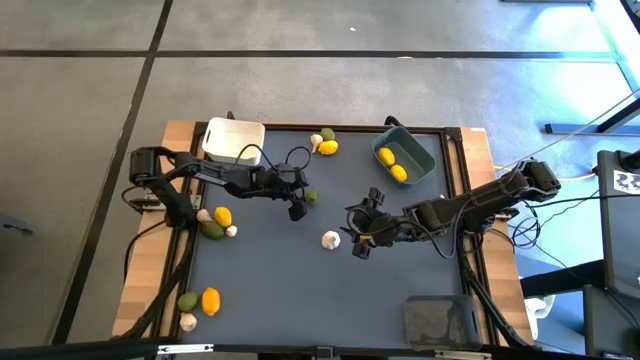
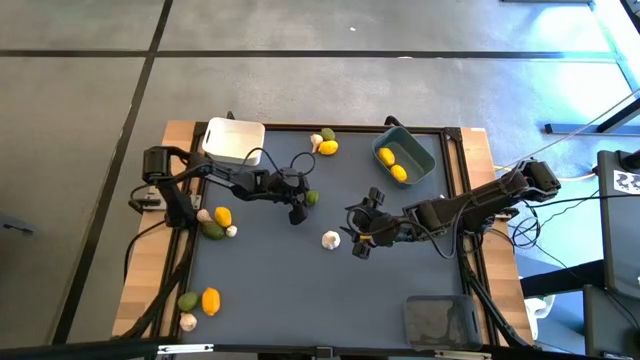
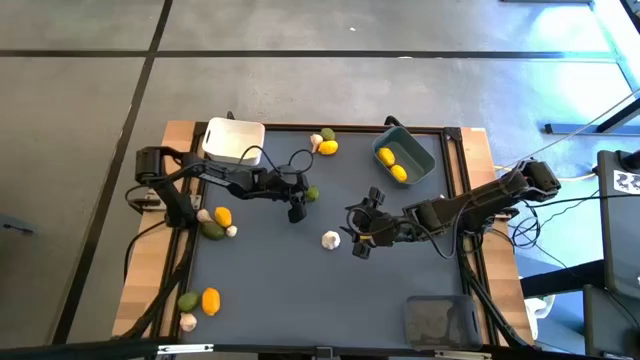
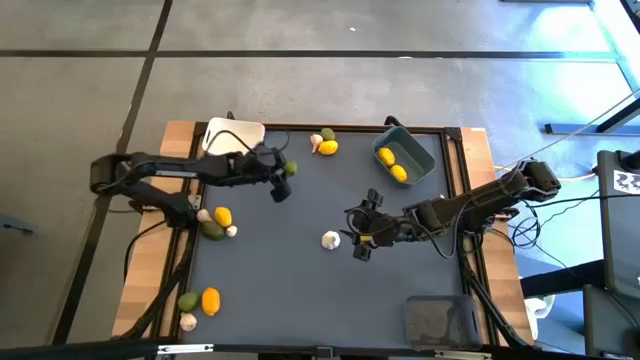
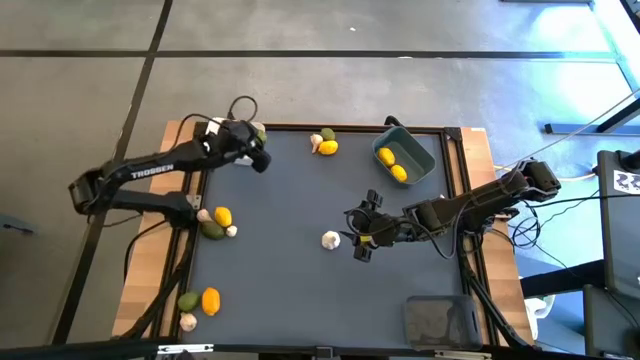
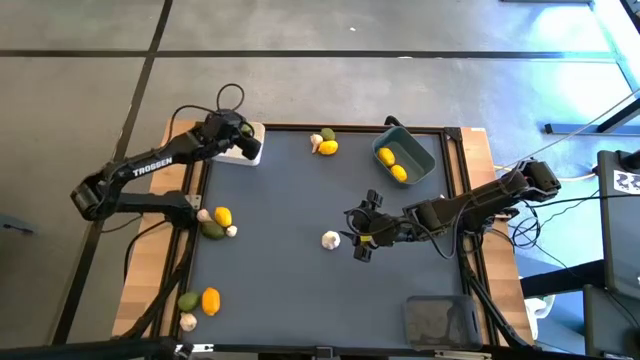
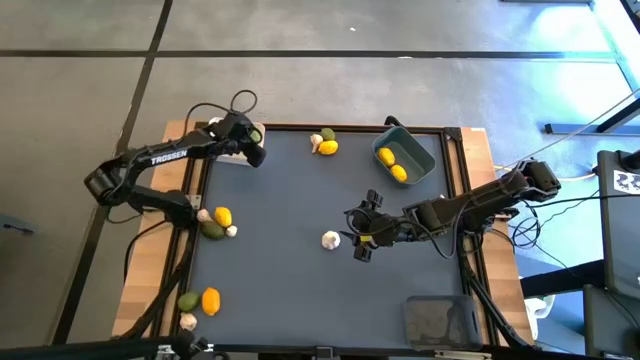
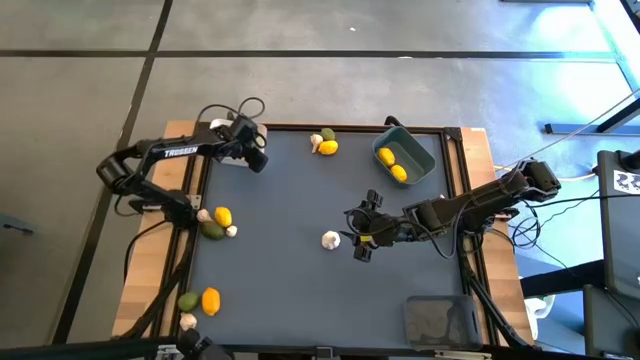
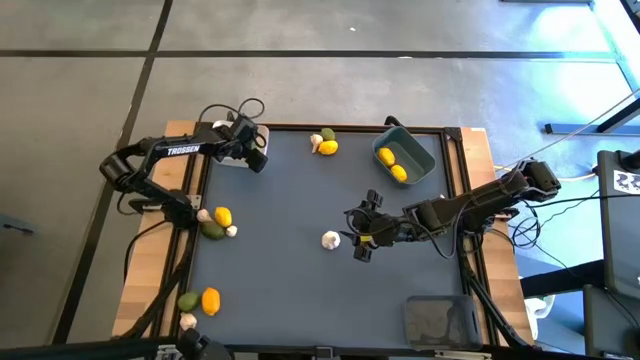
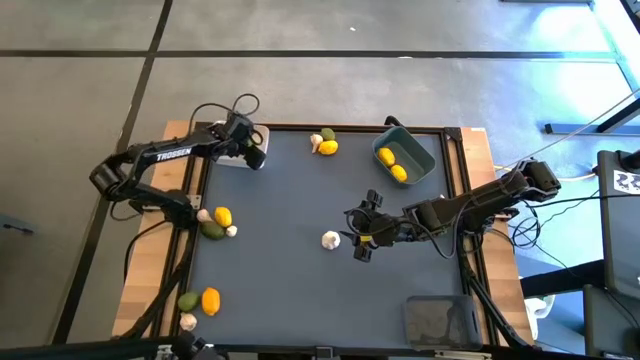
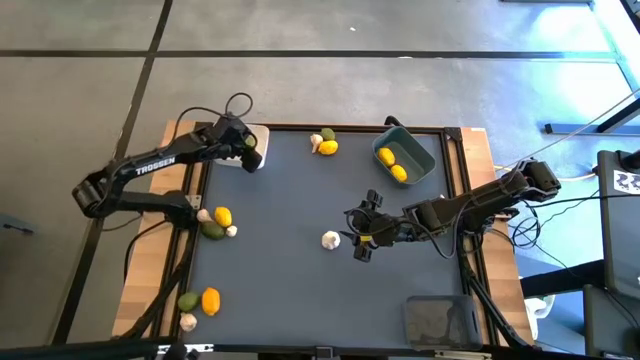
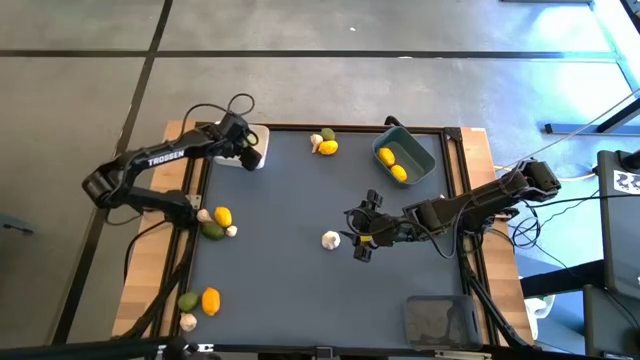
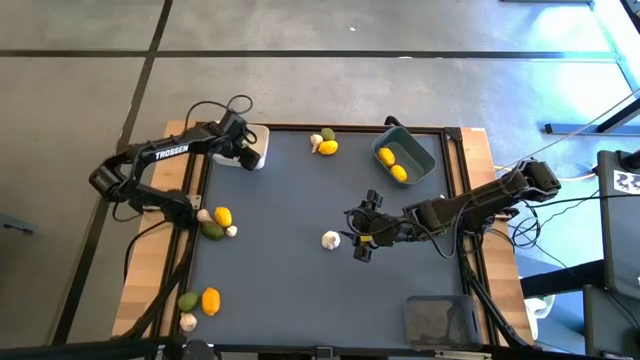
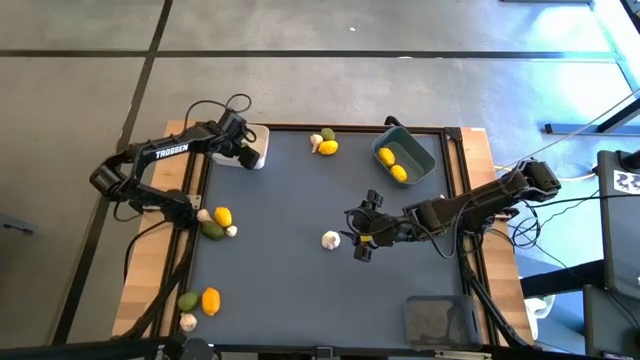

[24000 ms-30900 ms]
Task: Sort produce into baskets
Put the lime into the white bin

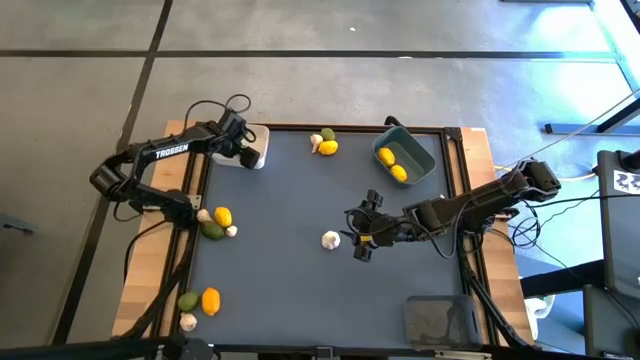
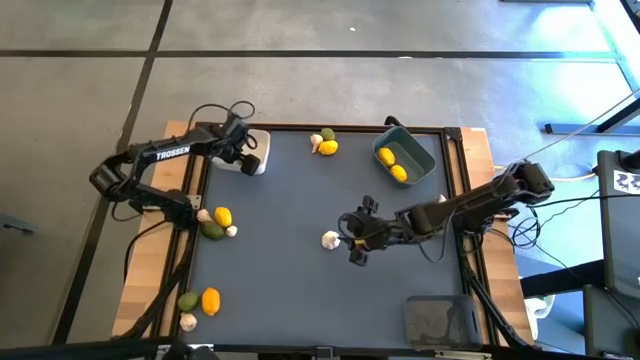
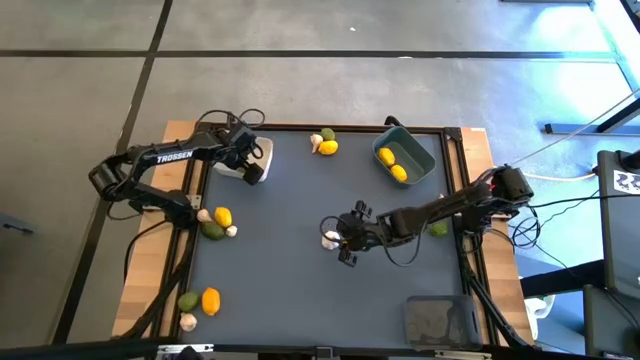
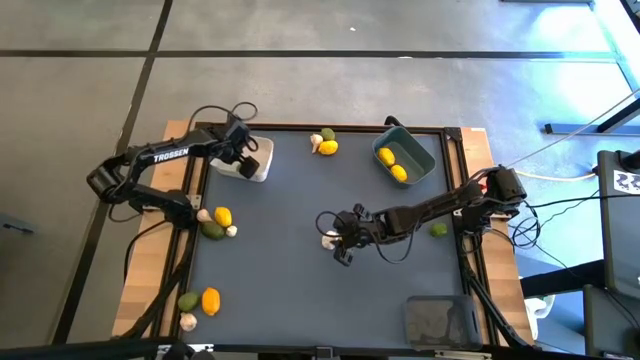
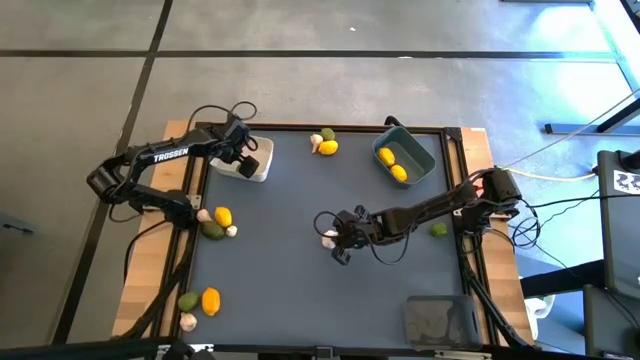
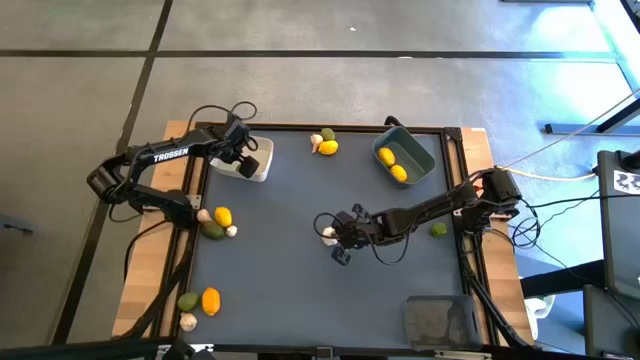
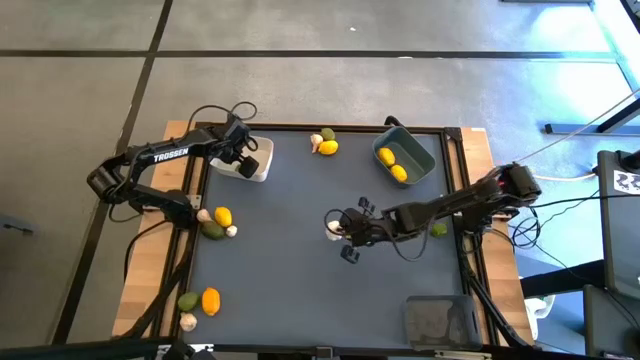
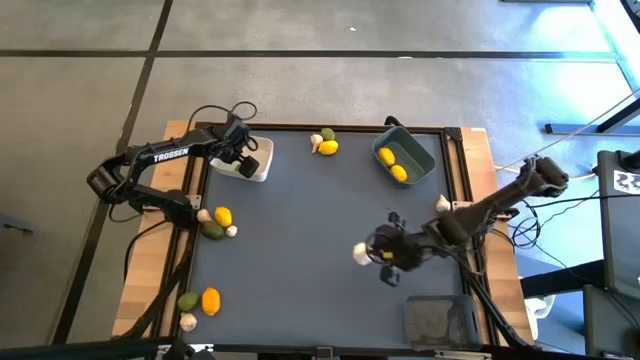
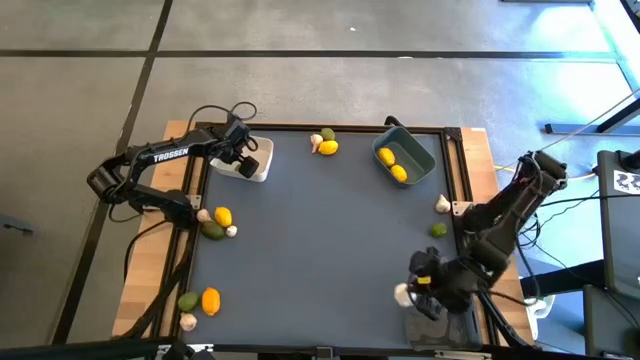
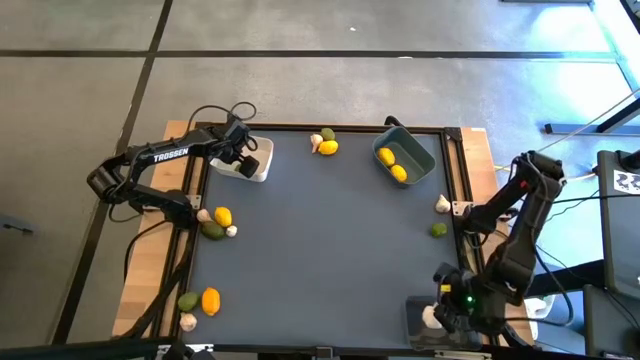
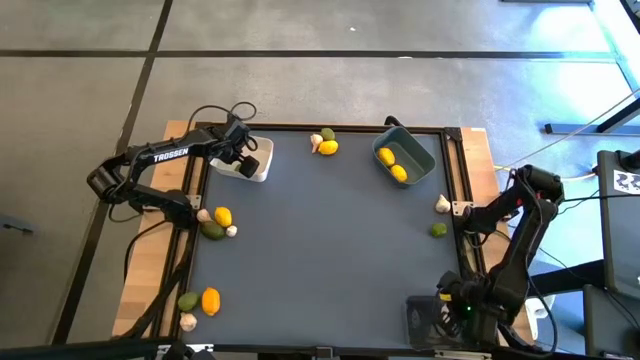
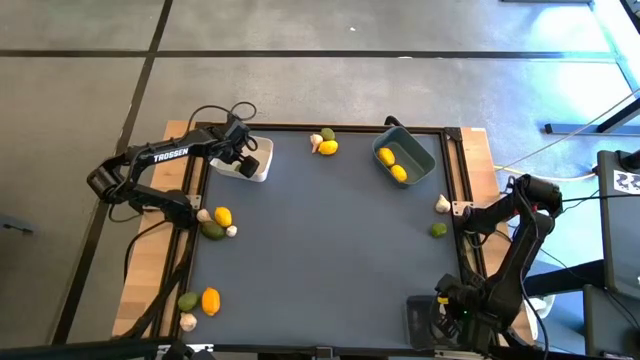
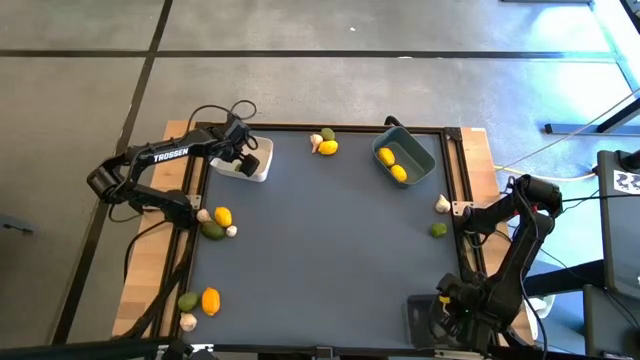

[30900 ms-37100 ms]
Put the white garlic into the black bin

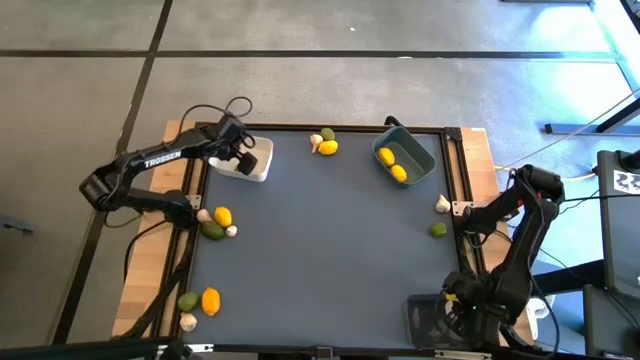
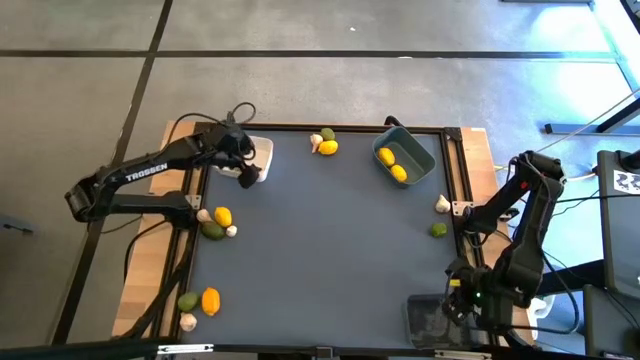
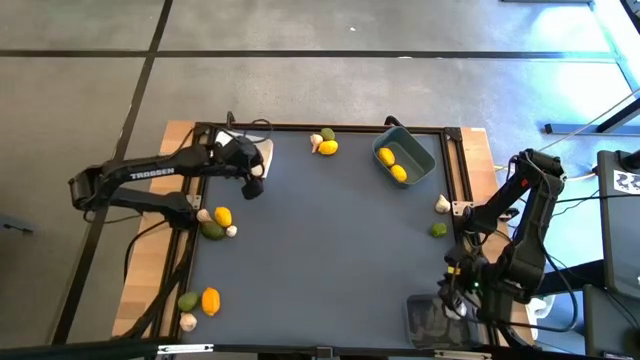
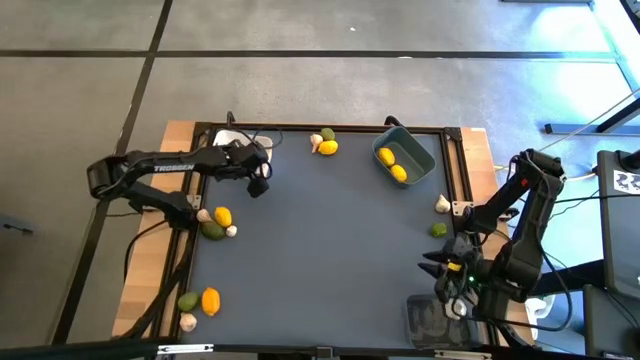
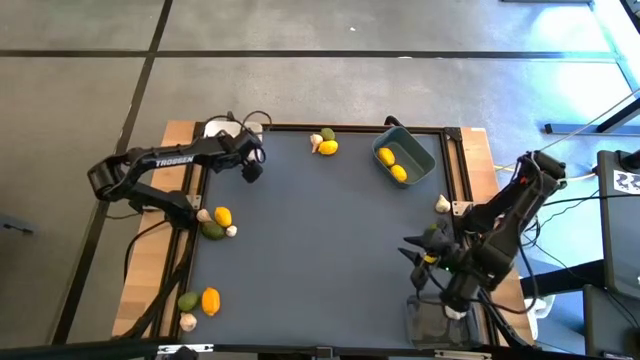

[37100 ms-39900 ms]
Adjust the white bin

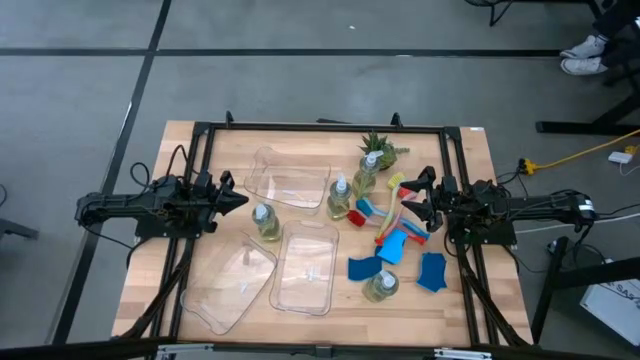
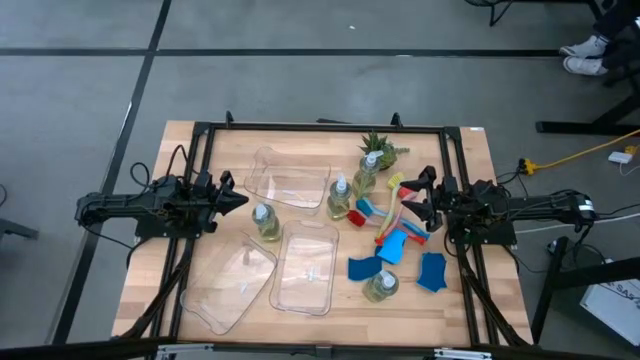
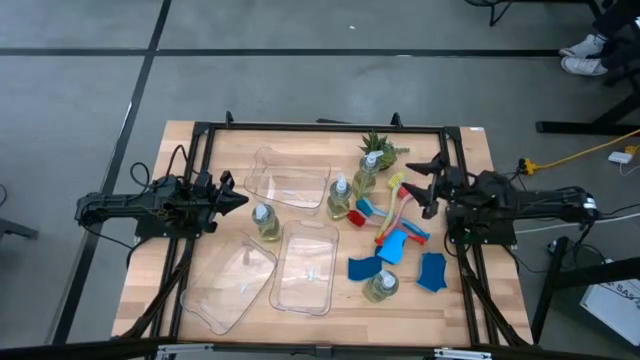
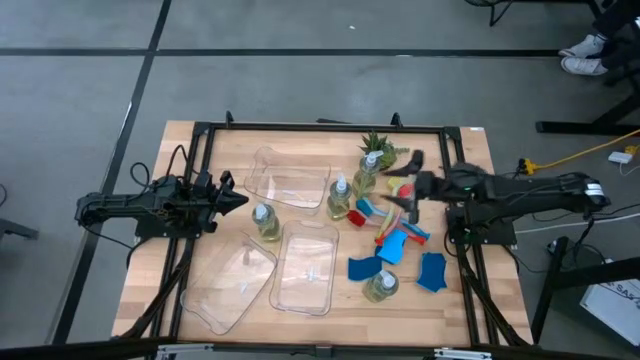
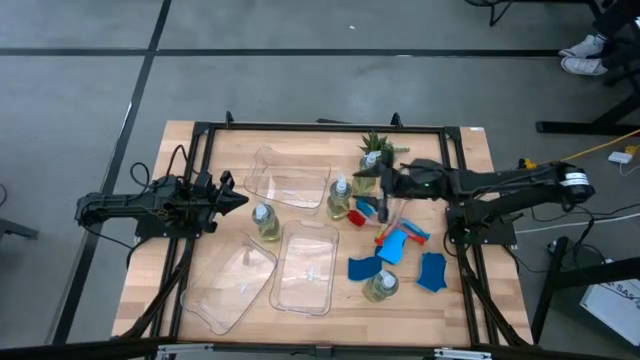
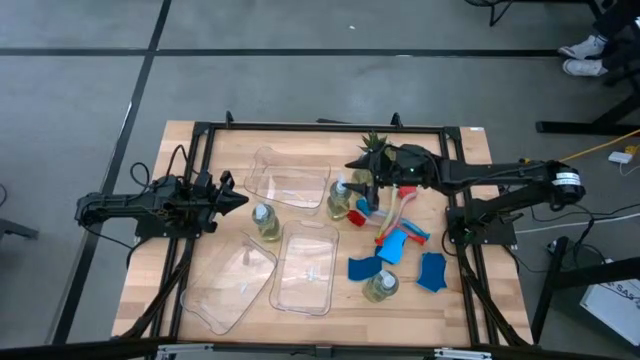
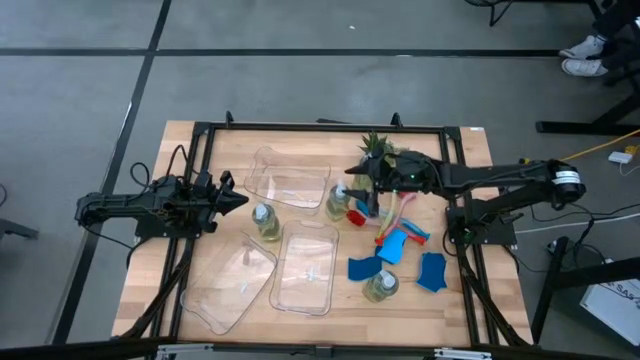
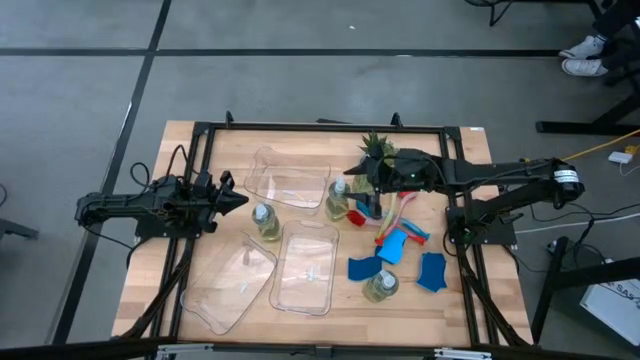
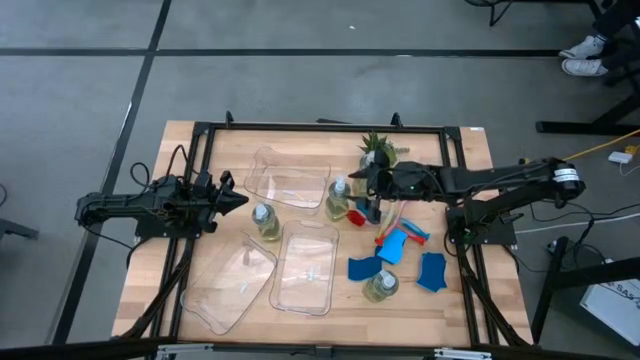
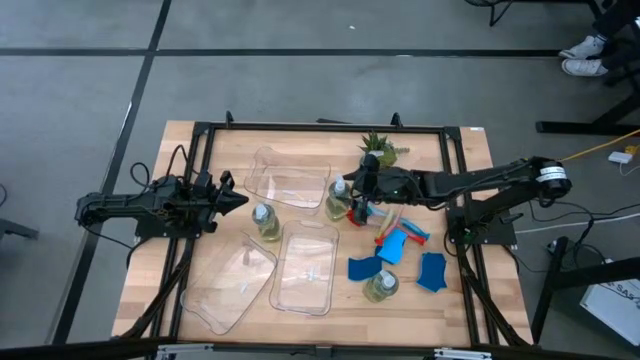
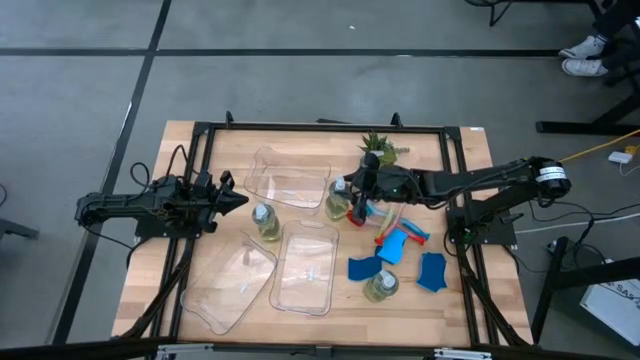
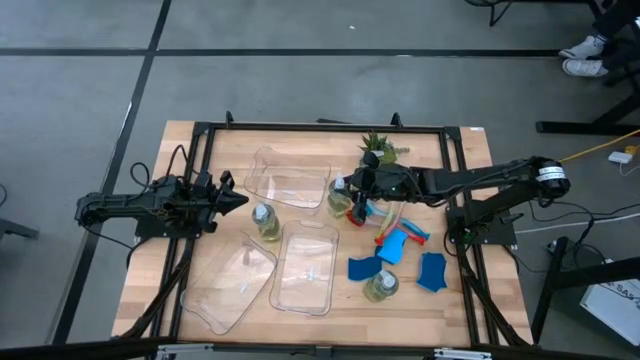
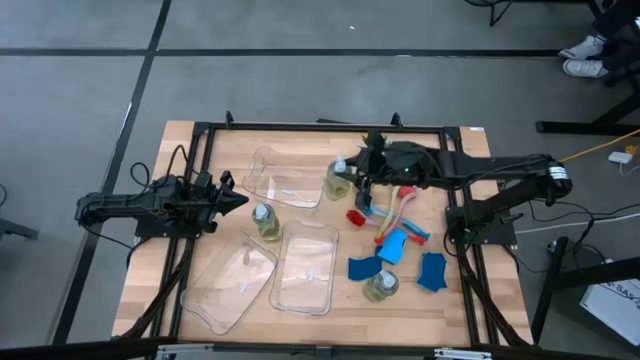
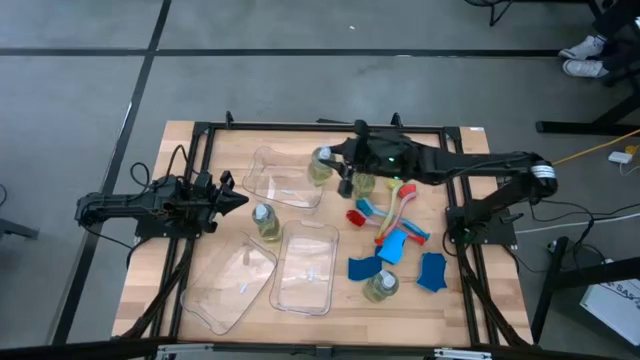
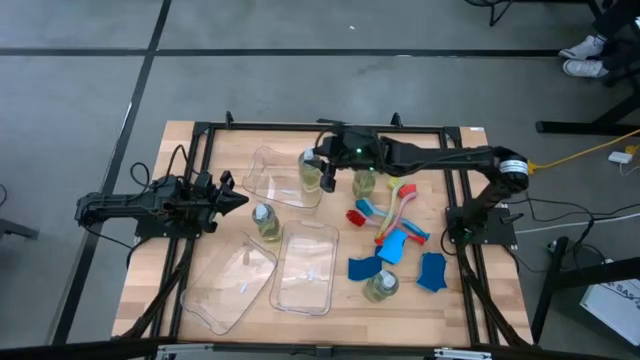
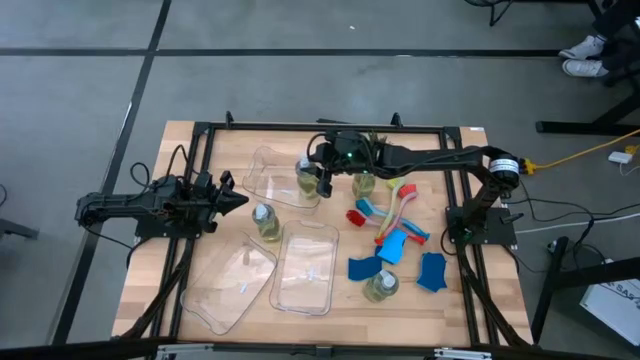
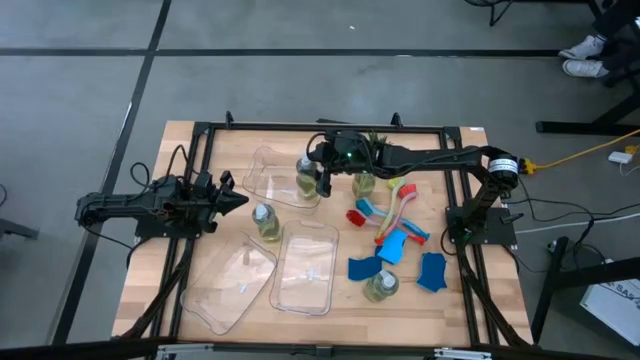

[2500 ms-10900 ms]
Task: Pick & Place Kitchen Sink Supplies
Put the green soap dispenser into the top transparent bin
